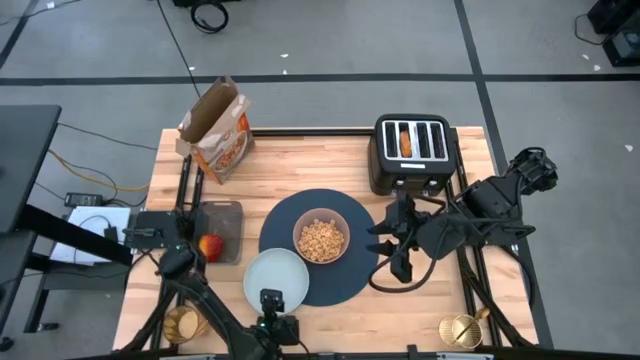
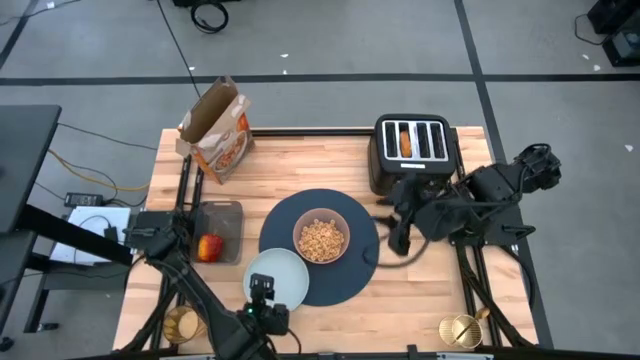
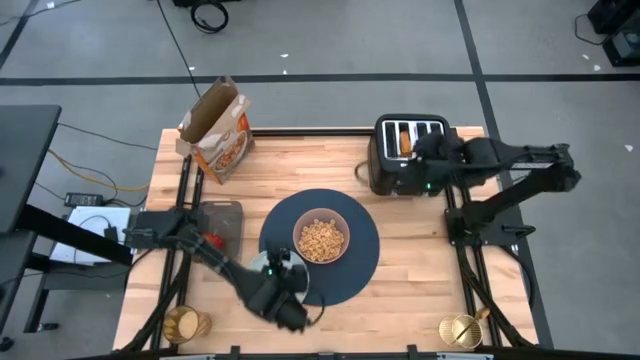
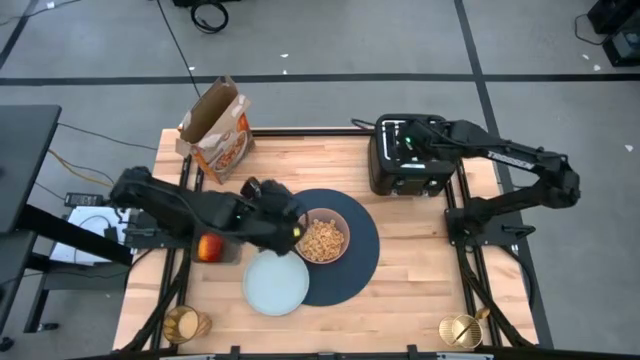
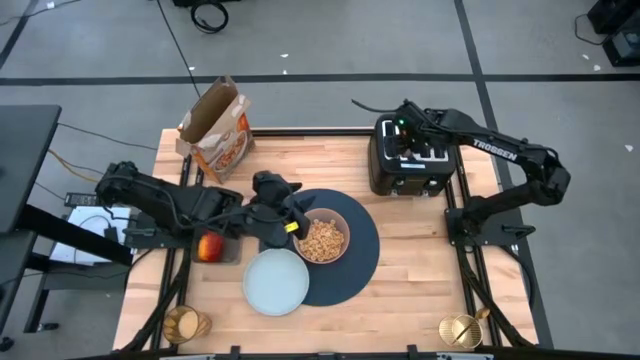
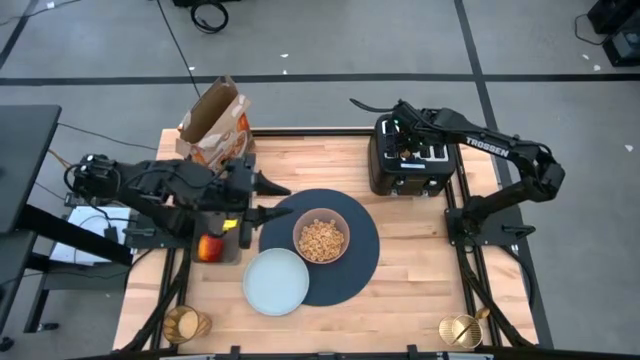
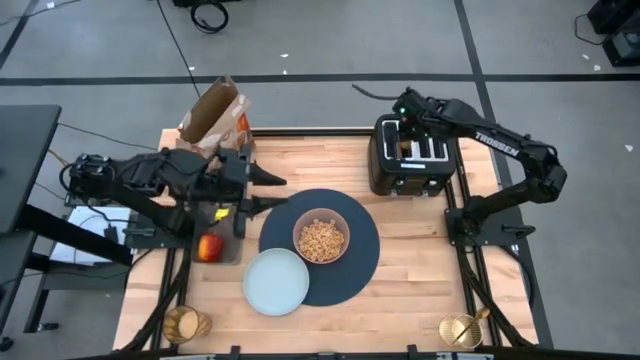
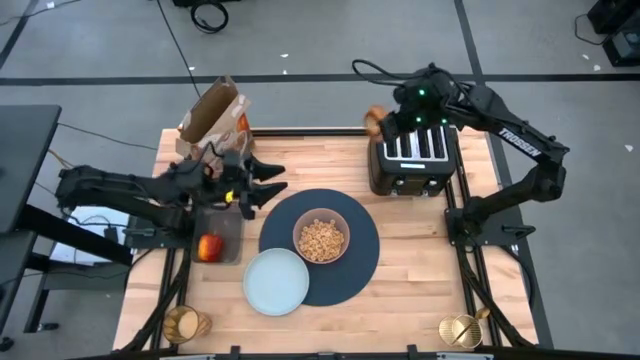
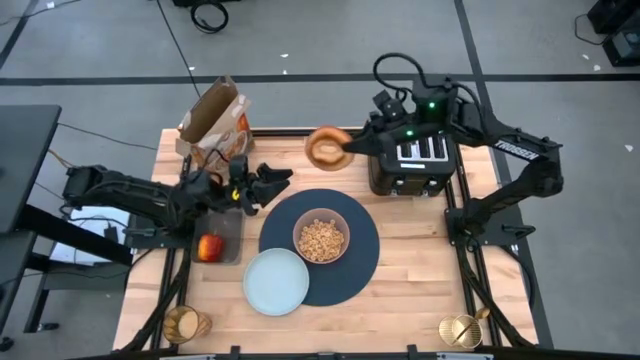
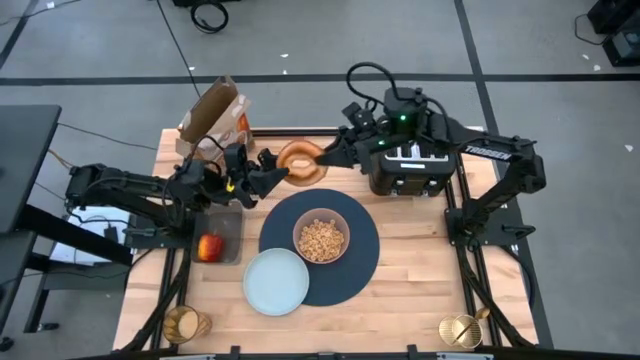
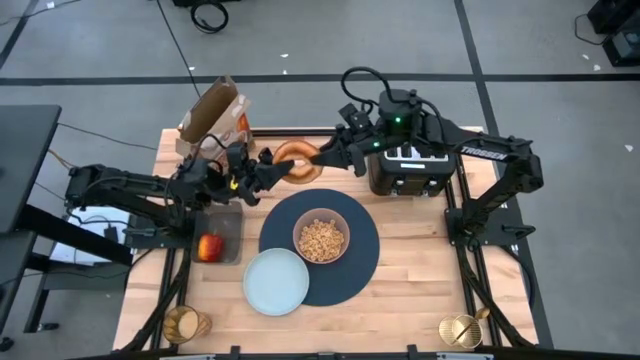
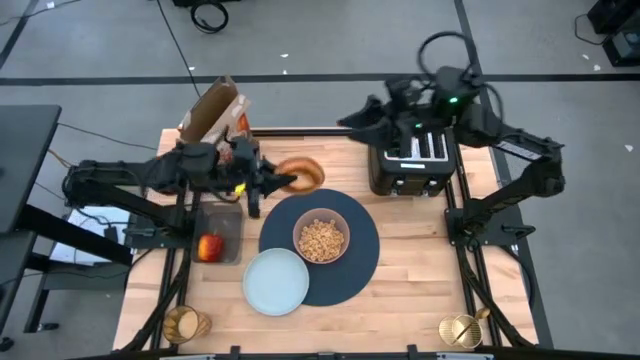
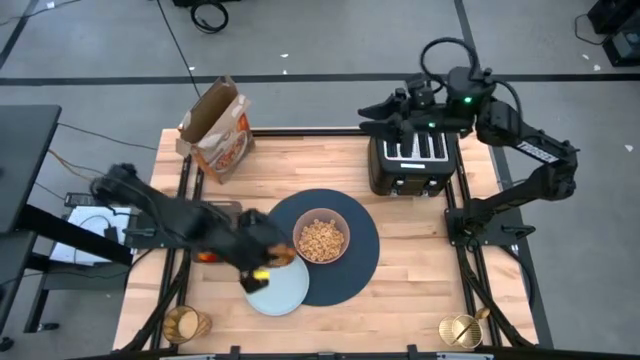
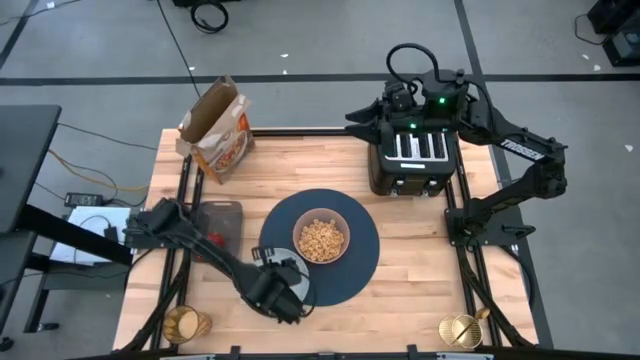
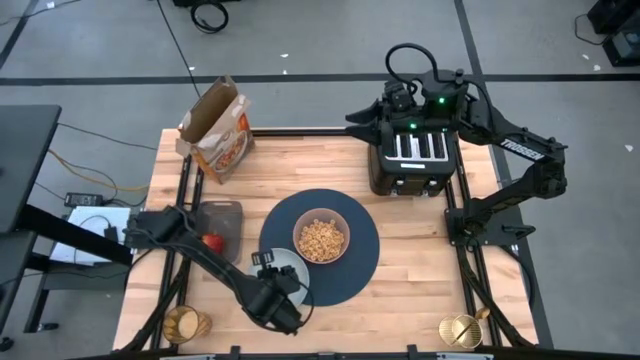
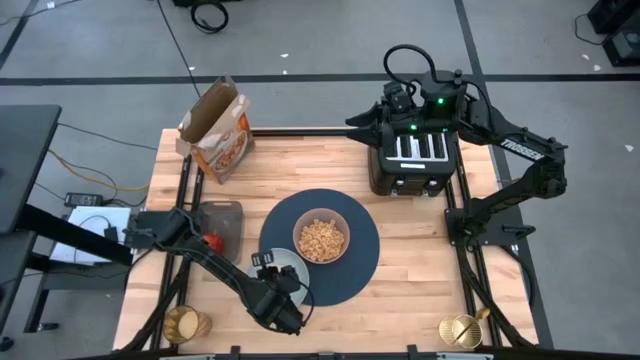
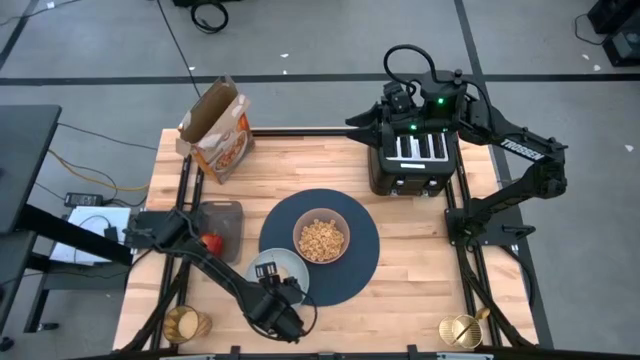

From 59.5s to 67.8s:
Task: Arrange a breakfast setting
Put the toasted bread on the blue plate

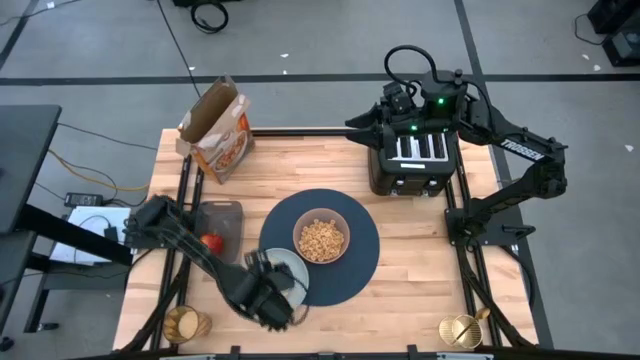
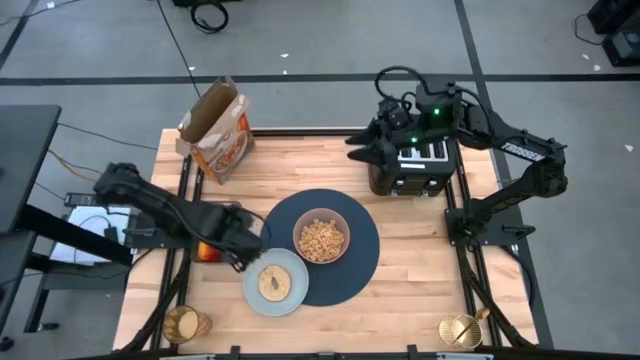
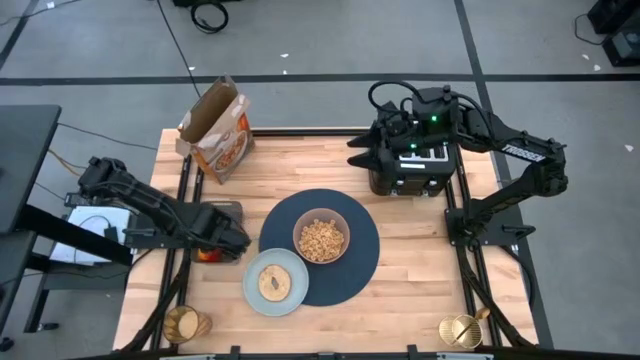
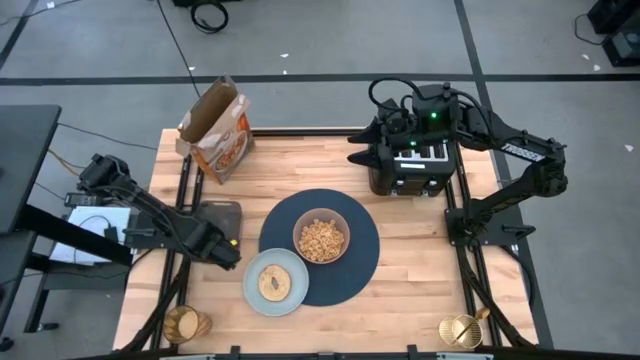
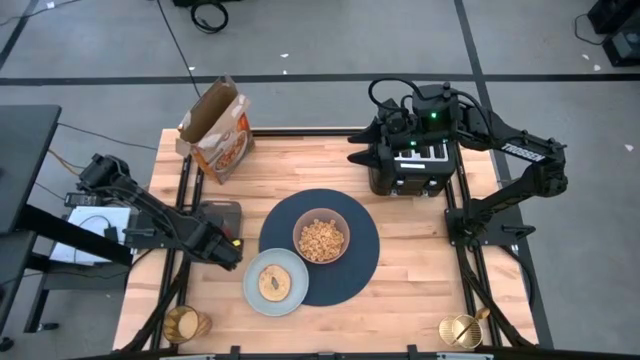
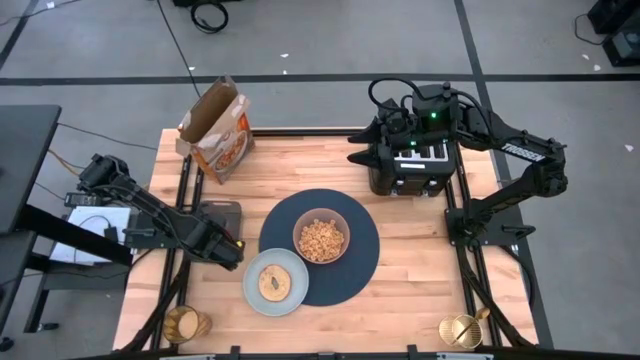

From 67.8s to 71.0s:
Put the apple on the blue placemat

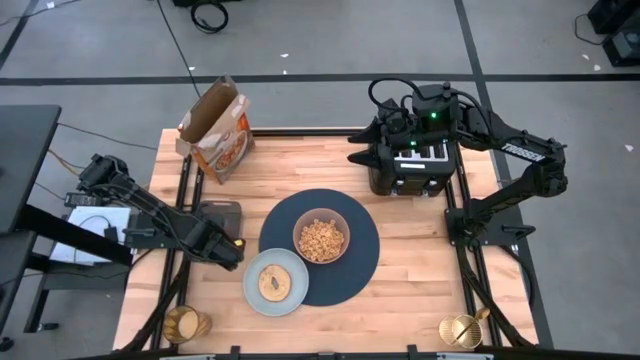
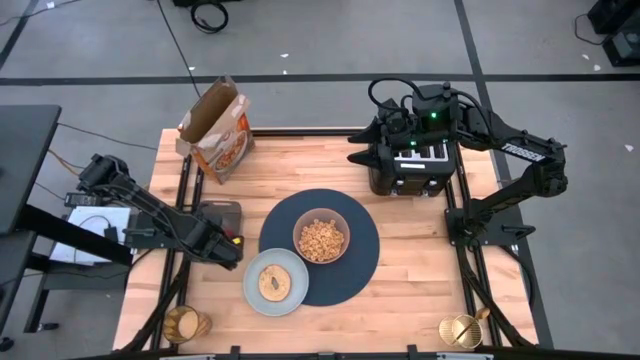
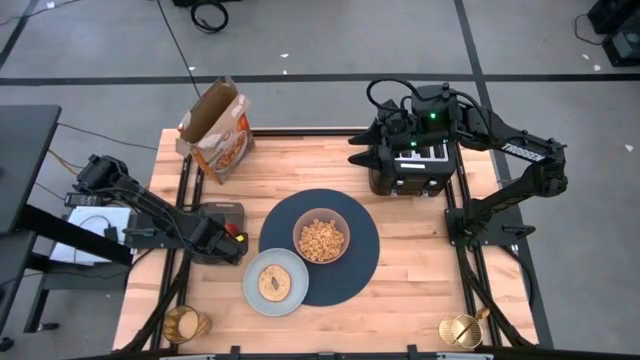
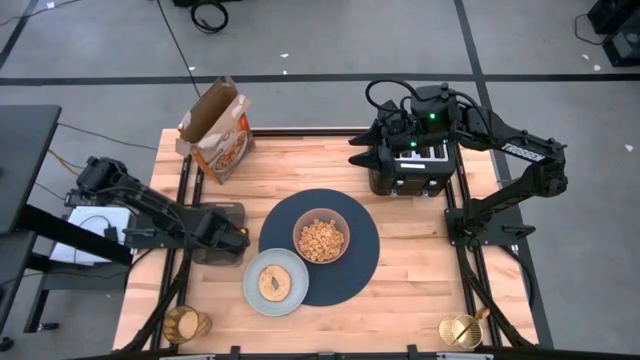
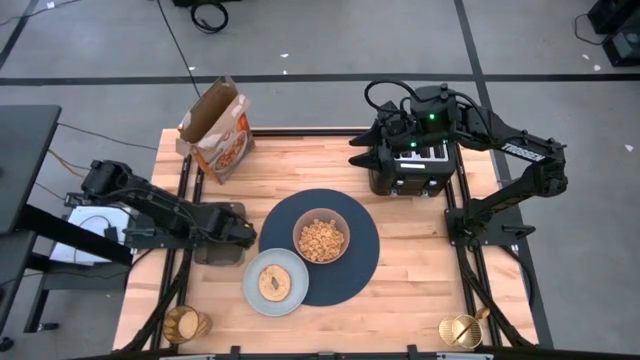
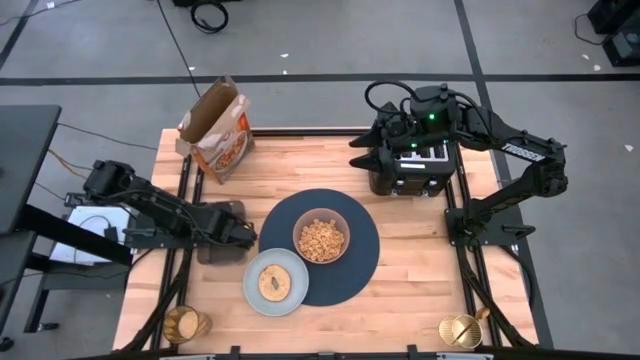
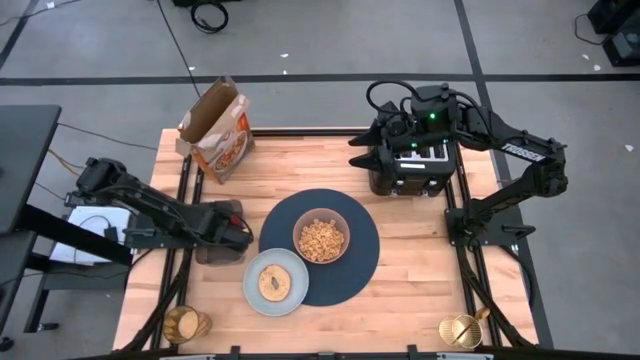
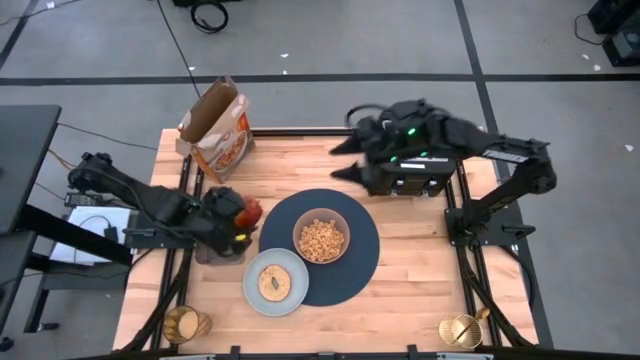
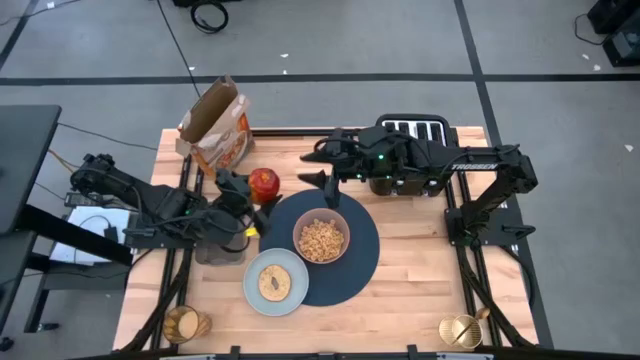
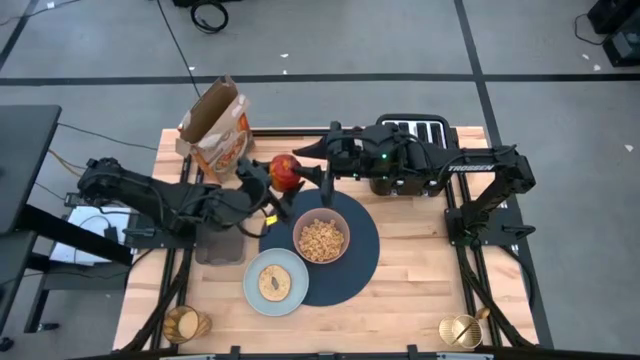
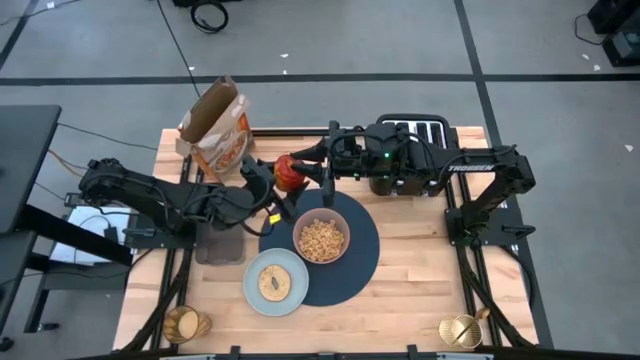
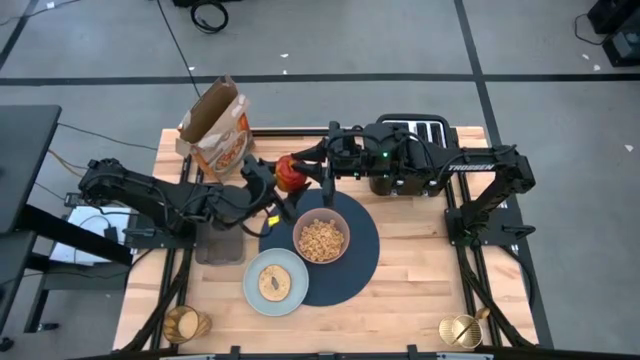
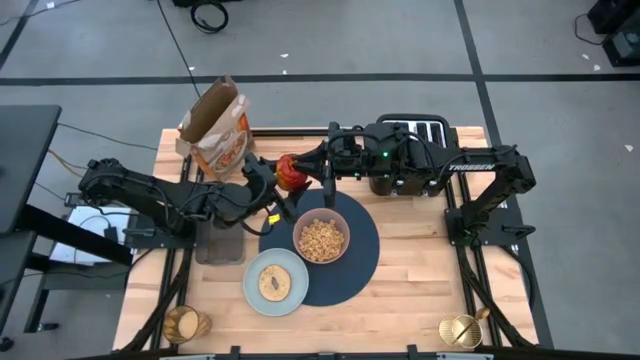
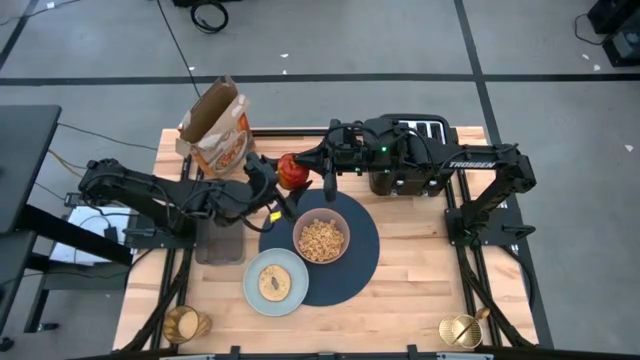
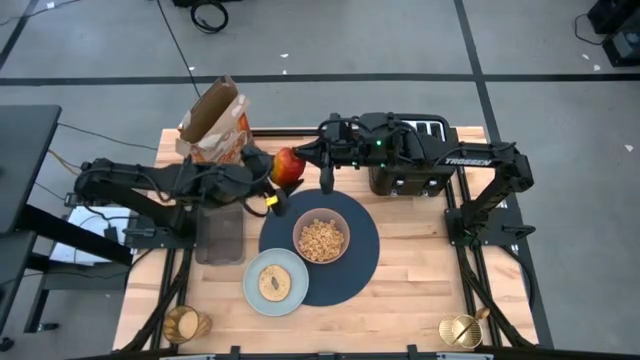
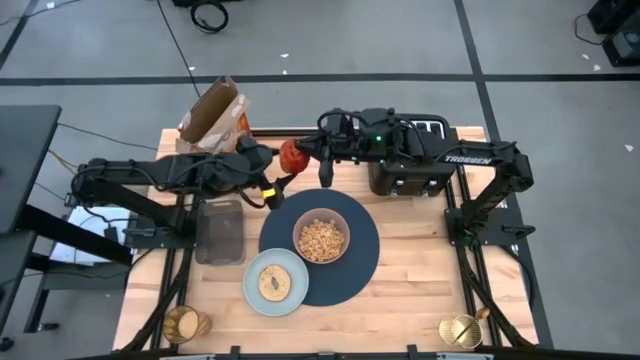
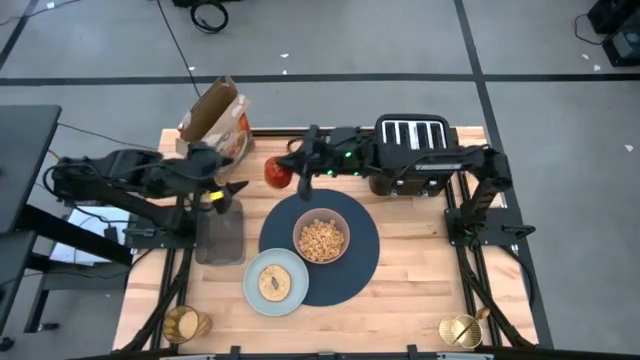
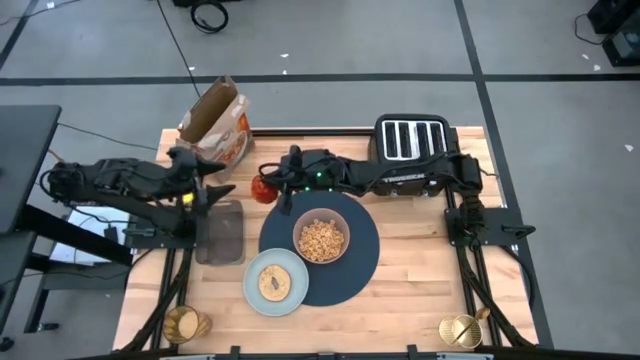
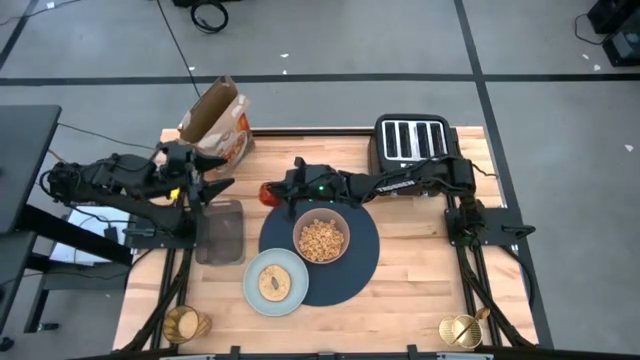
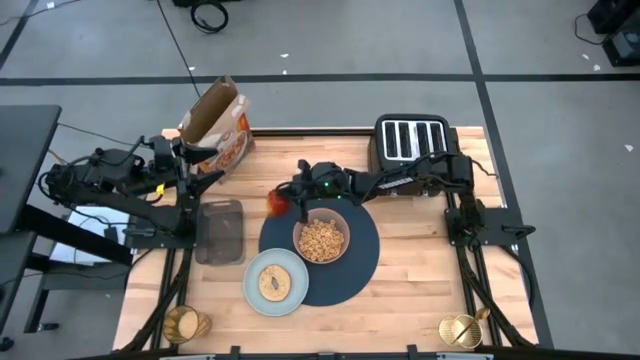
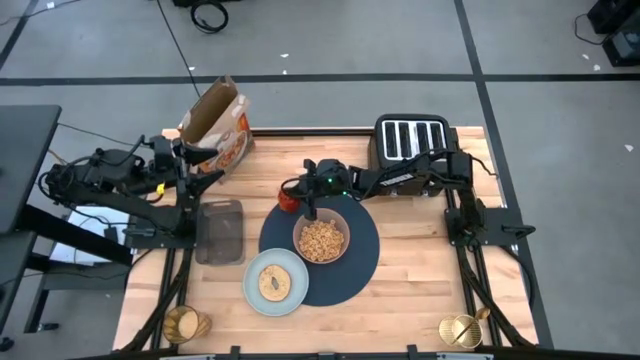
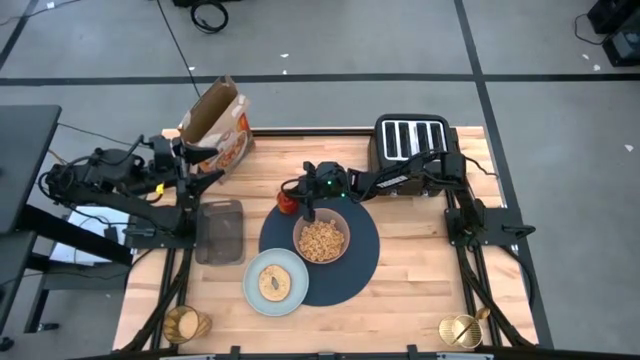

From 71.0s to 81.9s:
Put the apple on the top left of the orange bowl on the blue placemat

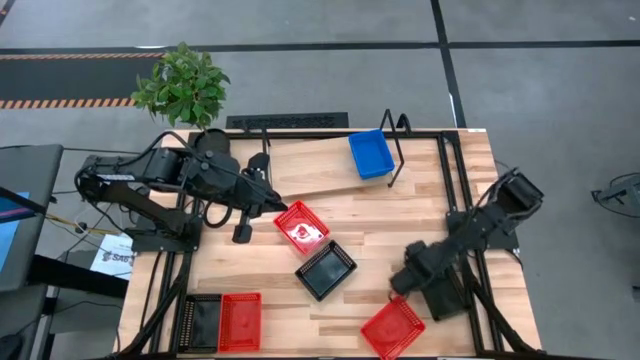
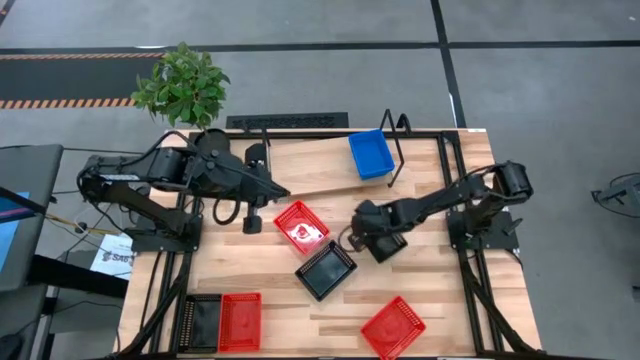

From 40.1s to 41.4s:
Task: Stack baskets on shelf by color
Move the black bin from the bottom right to the center table
